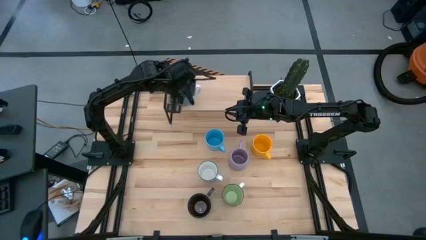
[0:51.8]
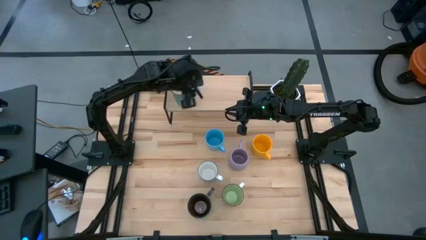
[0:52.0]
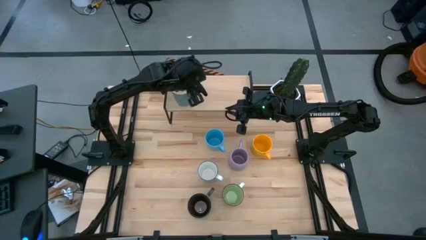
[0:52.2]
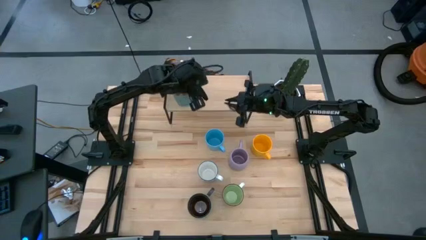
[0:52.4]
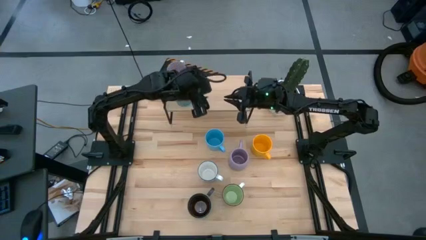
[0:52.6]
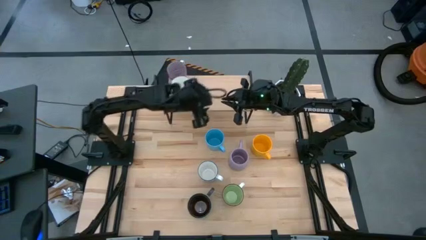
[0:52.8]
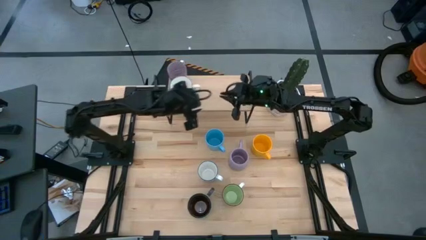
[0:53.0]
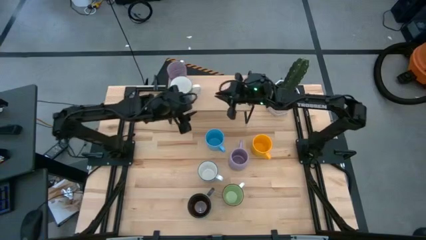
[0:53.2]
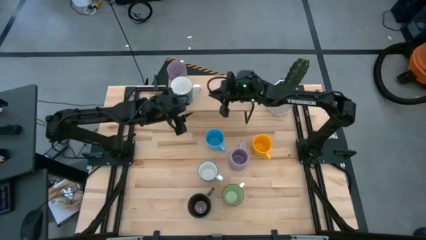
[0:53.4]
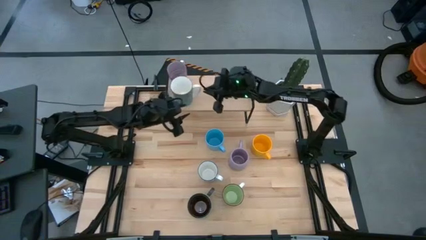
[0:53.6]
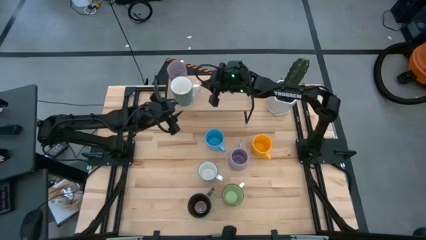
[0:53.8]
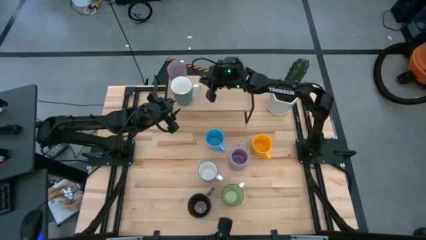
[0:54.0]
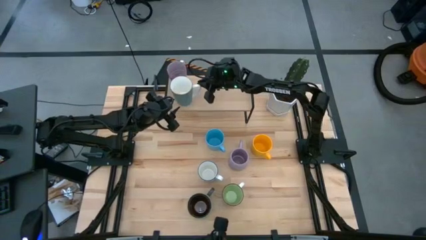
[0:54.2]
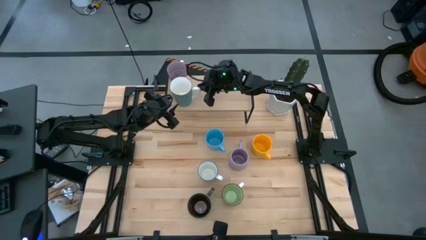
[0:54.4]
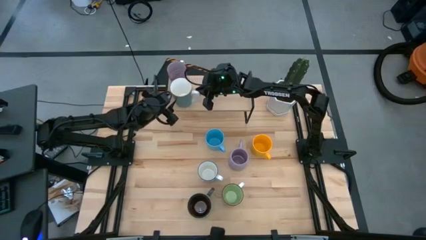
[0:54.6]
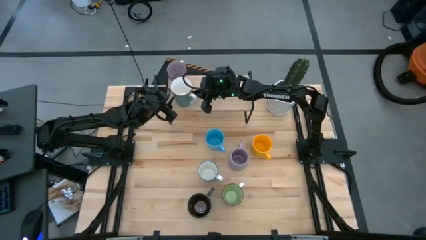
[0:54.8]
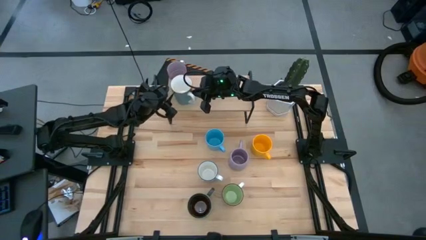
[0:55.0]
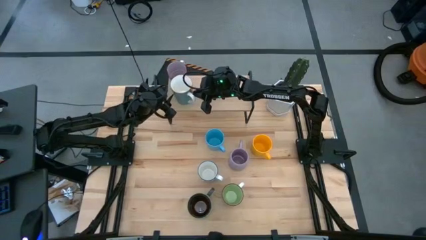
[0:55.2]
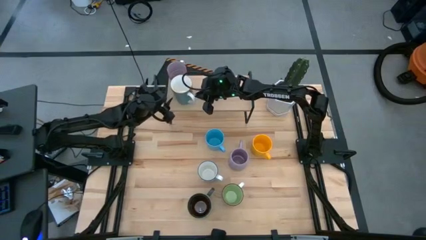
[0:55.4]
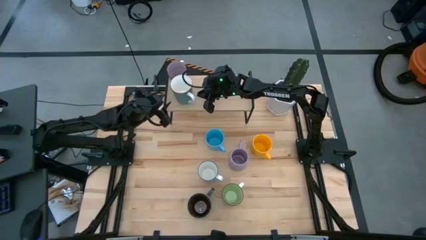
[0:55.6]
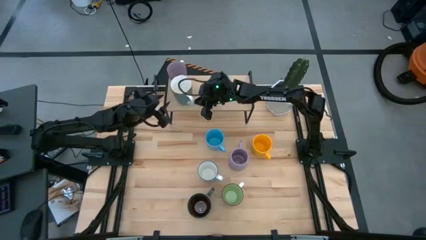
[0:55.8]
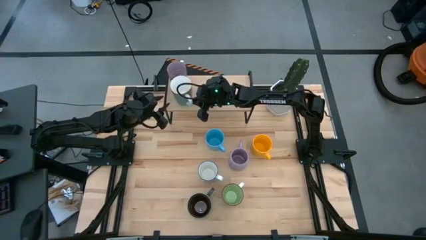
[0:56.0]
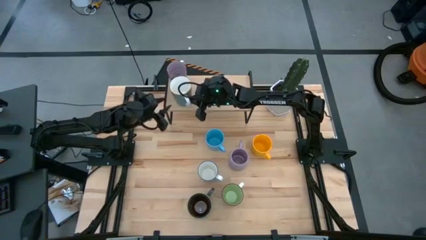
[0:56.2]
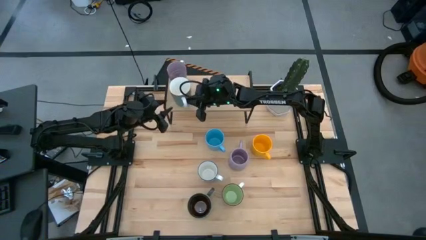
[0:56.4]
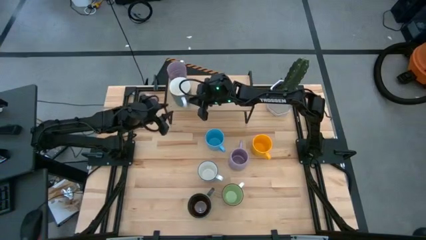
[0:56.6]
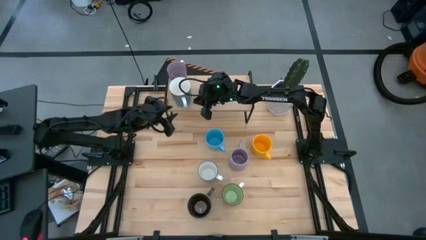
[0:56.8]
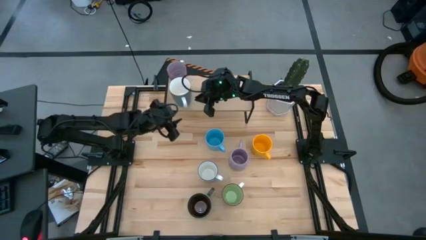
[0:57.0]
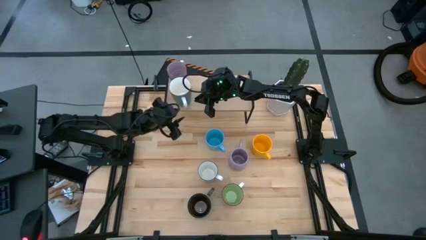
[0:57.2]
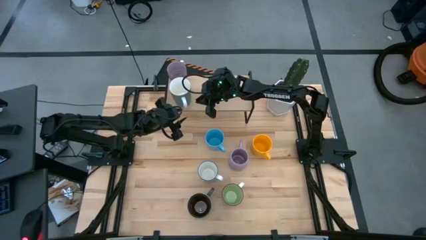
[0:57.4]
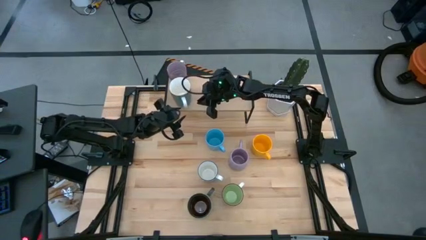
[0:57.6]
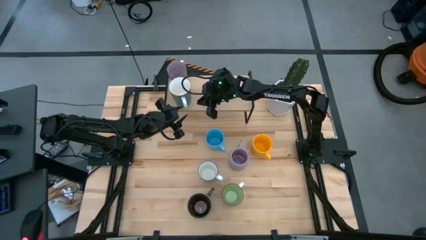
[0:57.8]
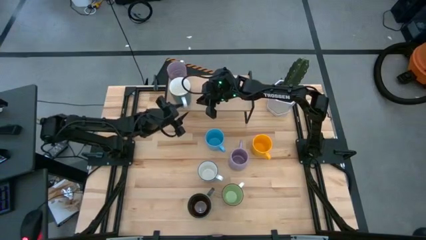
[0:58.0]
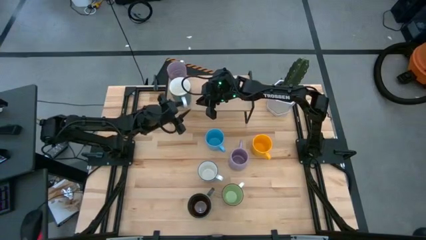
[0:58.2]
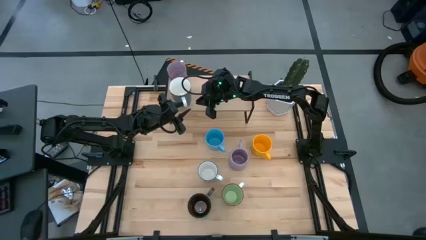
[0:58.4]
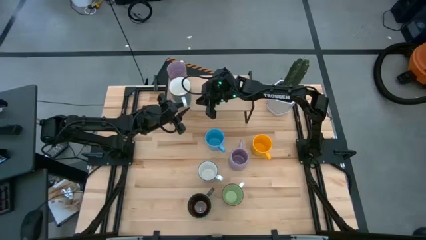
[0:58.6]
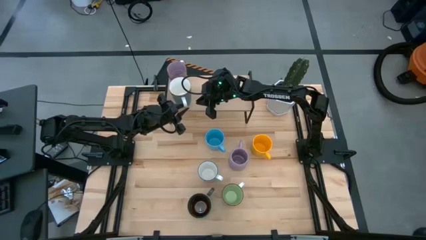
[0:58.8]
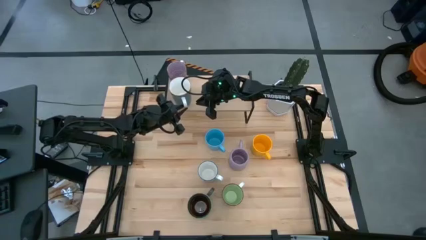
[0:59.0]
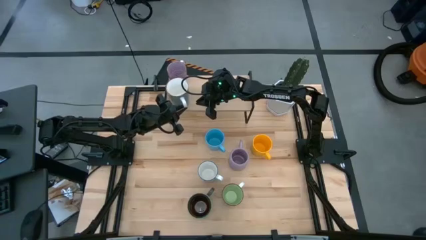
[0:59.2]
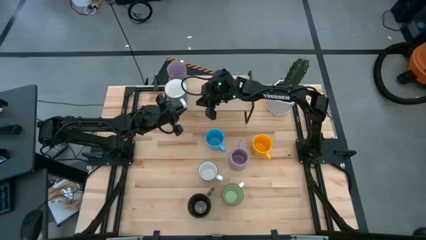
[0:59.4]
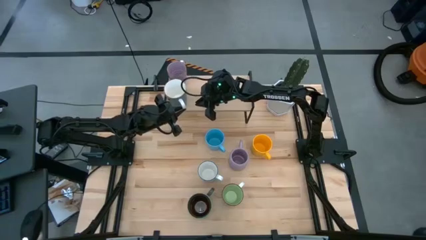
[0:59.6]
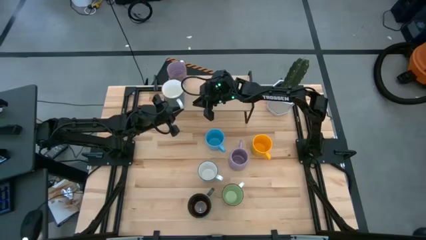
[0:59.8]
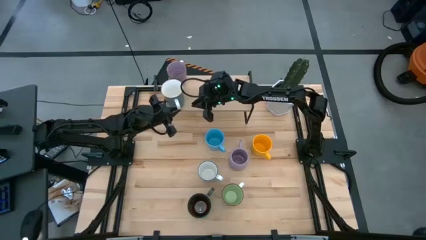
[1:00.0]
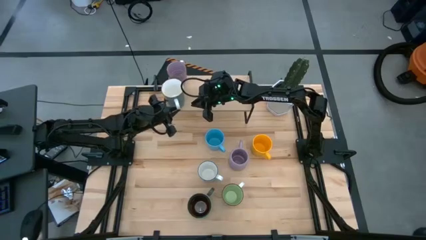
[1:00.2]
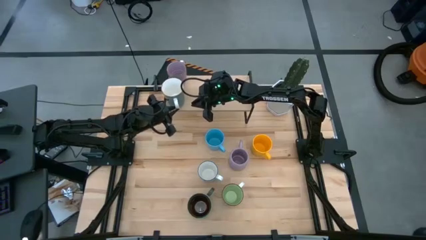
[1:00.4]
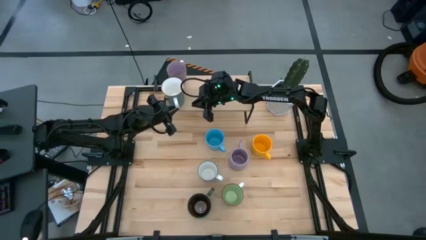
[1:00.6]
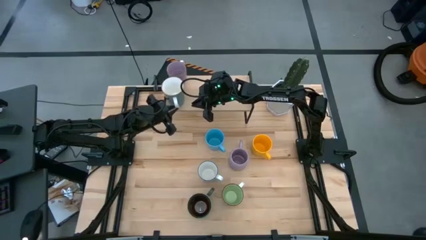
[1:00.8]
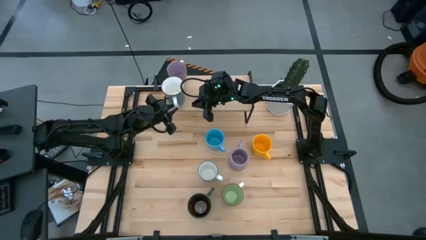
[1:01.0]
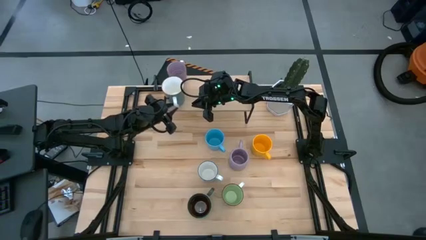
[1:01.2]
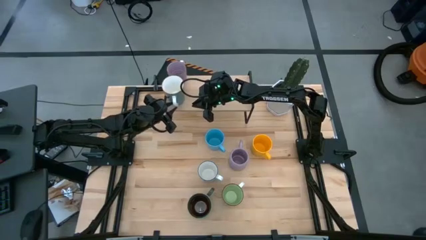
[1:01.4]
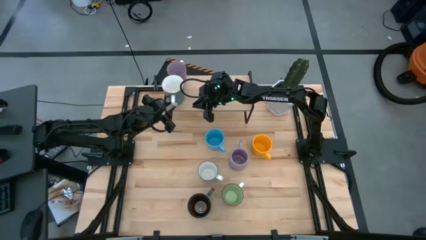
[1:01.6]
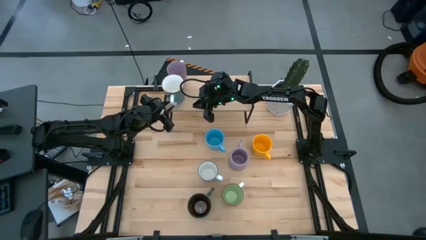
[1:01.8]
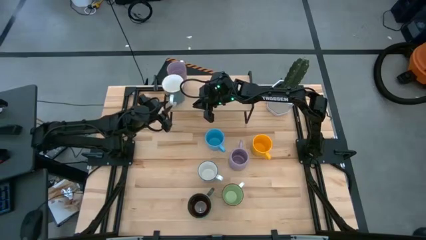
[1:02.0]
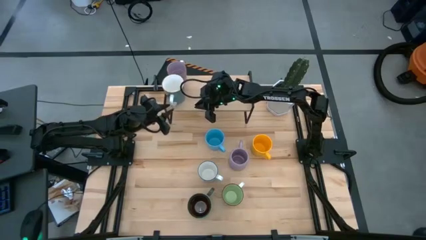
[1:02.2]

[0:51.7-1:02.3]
Task: Place coffee mugs
Put the dark green mug on the shelf

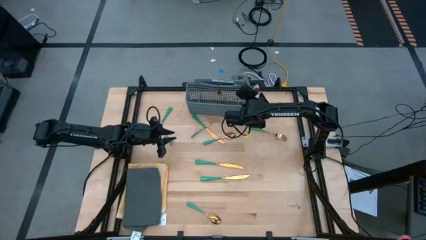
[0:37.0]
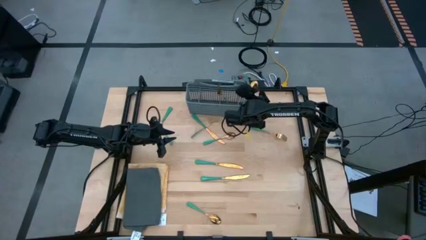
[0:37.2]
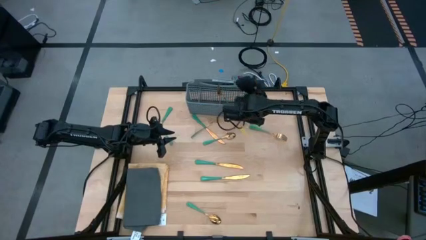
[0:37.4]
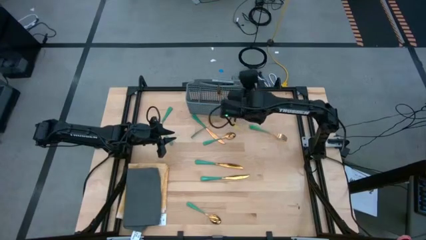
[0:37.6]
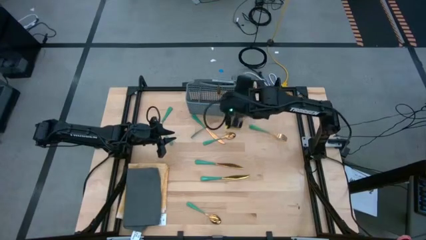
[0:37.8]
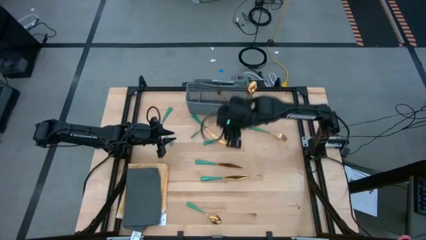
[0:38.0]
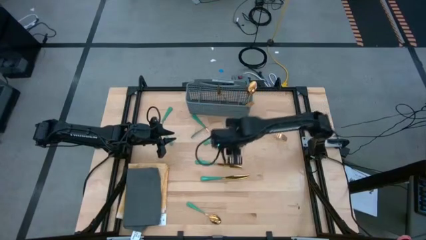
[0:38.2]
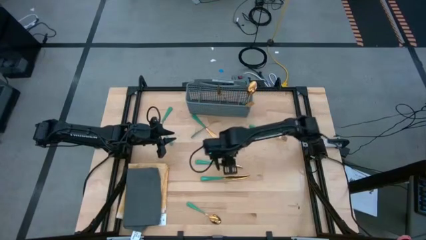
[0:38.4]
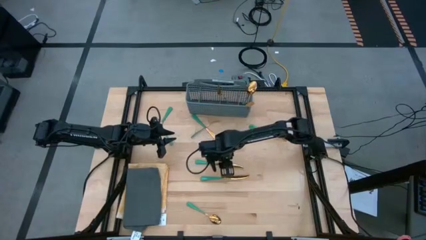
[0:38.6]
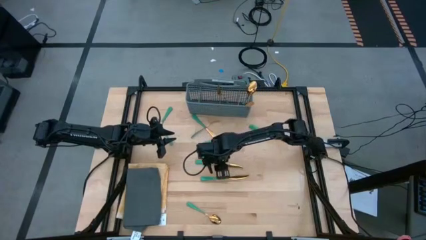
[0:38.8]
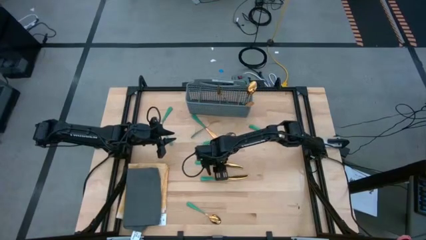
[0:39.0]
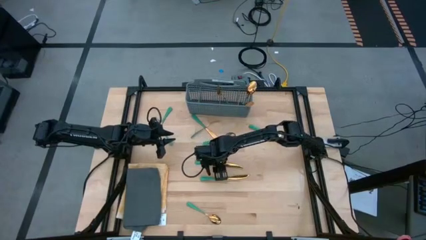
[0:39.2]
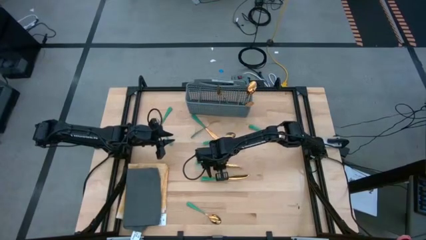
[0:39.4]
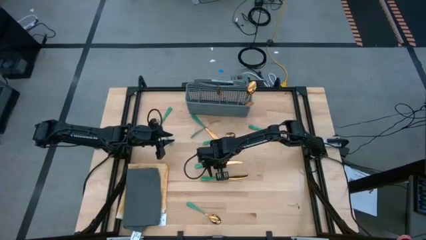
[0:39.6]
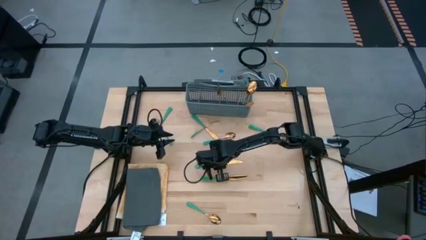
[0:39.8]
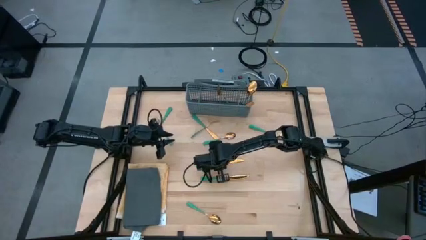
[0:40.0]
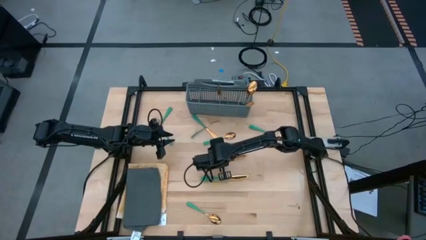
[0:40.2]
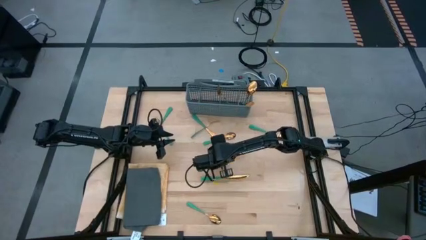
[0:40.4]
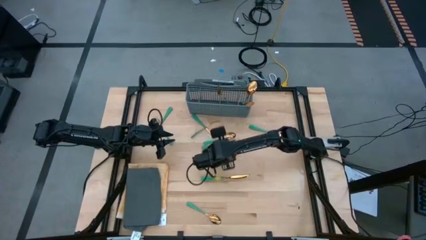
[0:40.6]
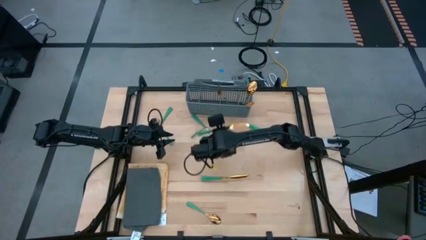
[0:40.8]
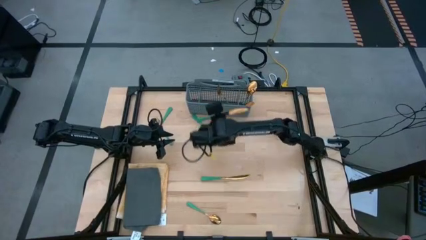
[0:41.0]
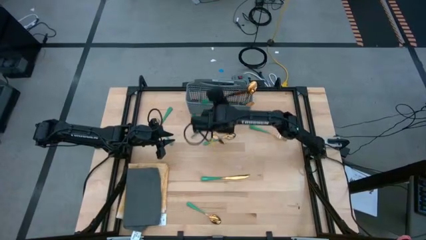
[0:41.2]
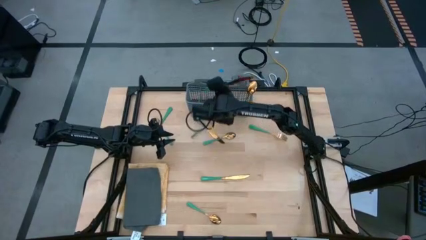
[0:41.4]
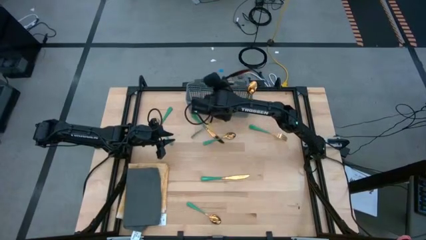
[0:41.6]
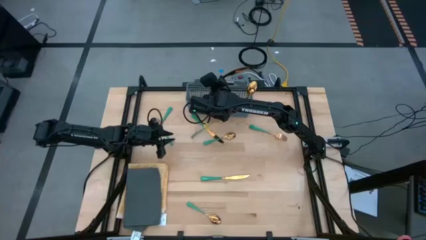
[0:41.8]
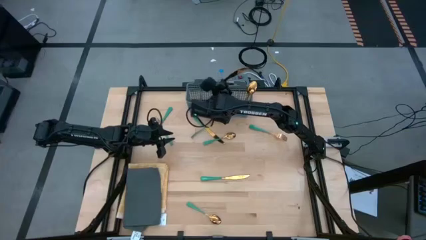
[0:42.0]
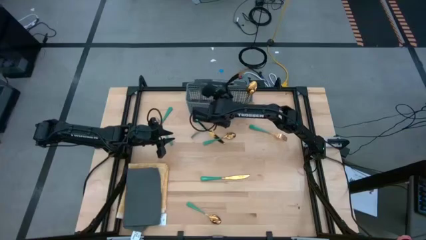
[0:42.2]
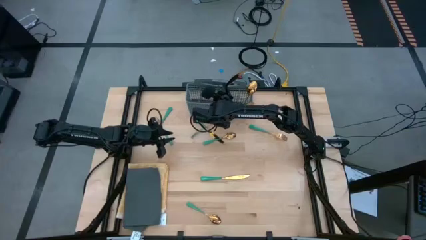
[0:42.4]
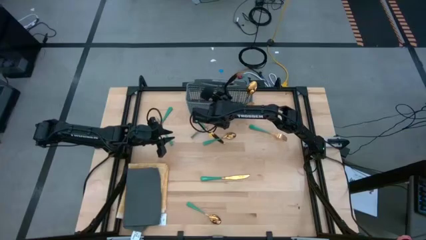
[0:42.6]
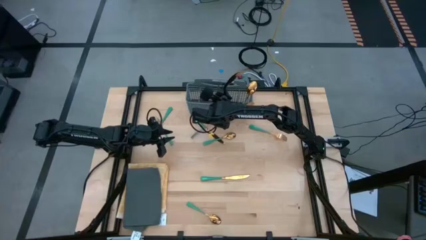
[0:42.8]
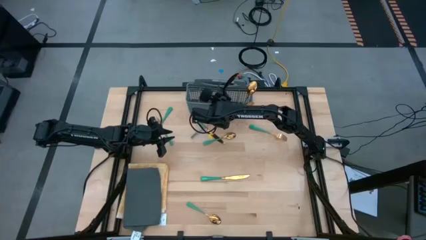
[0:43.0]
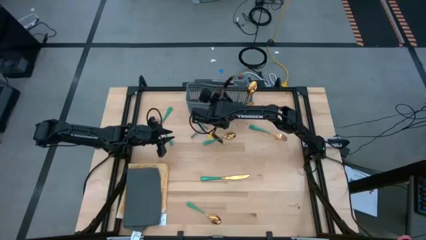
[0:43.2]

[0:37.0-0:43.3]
Task: Sort silverware
Put the green knife into the dishwasher utensil holder
